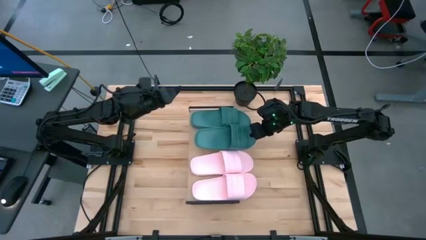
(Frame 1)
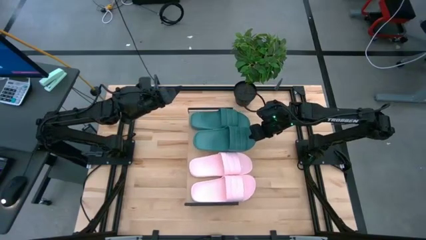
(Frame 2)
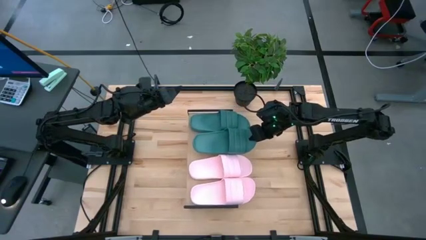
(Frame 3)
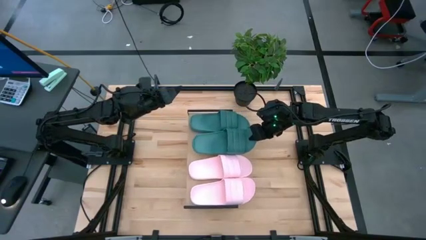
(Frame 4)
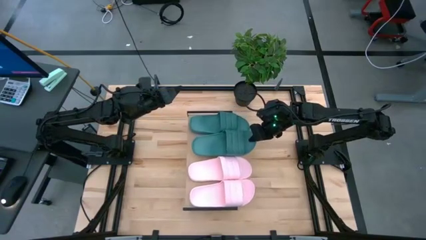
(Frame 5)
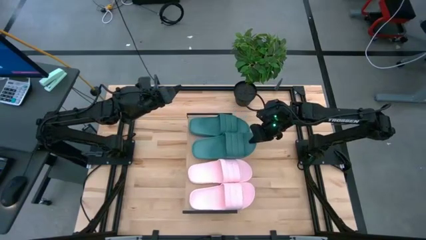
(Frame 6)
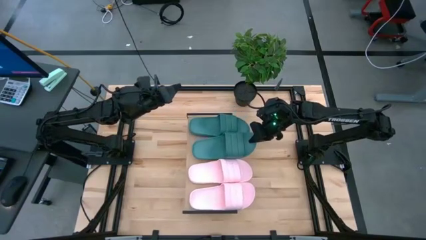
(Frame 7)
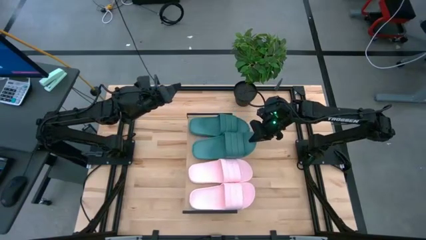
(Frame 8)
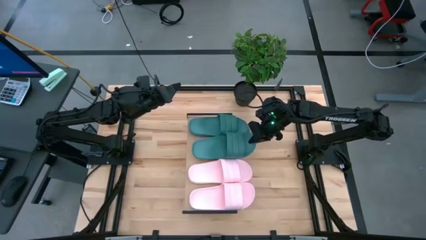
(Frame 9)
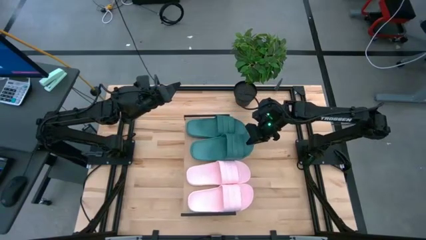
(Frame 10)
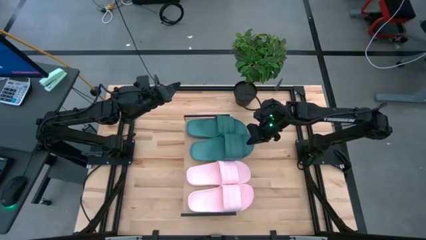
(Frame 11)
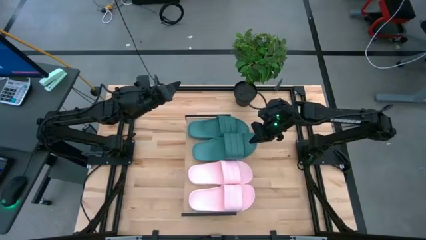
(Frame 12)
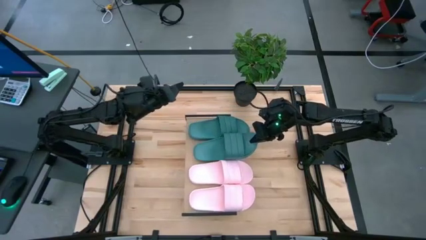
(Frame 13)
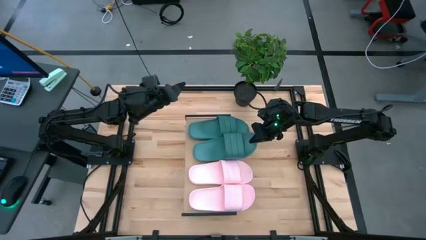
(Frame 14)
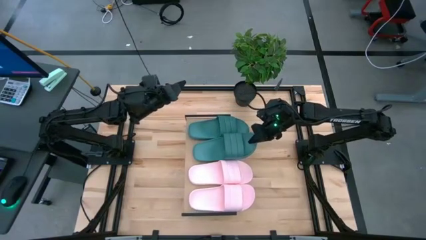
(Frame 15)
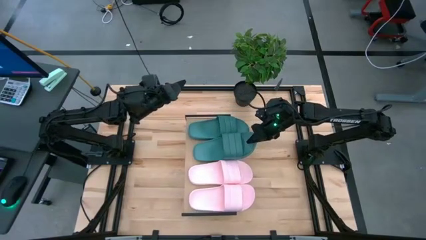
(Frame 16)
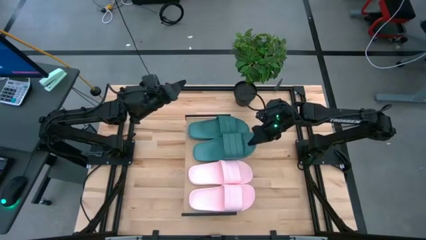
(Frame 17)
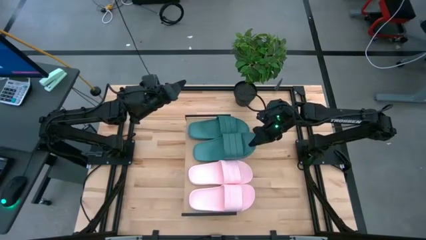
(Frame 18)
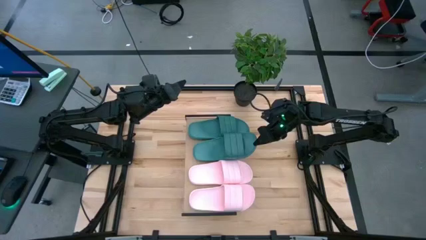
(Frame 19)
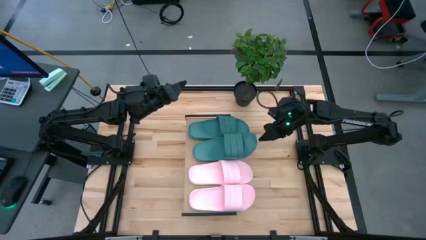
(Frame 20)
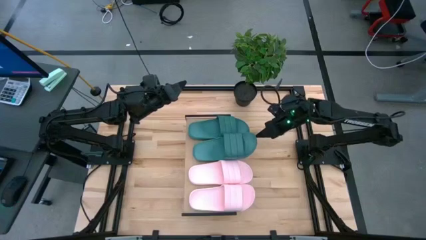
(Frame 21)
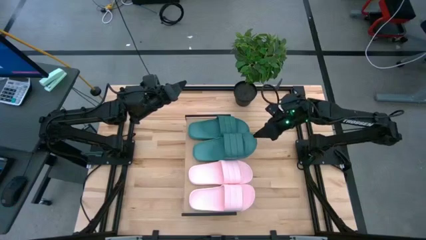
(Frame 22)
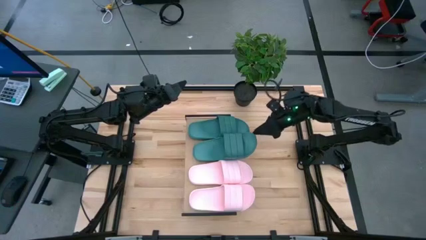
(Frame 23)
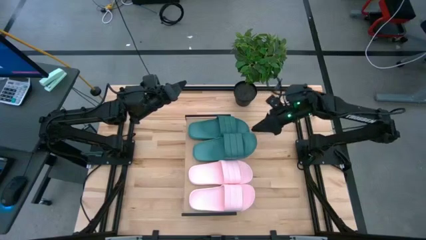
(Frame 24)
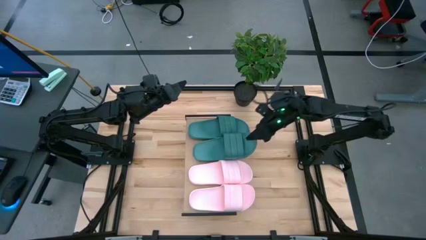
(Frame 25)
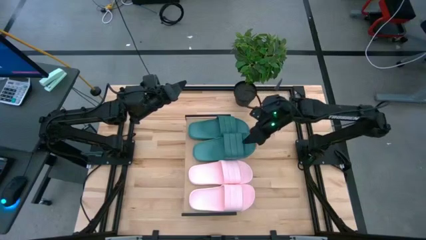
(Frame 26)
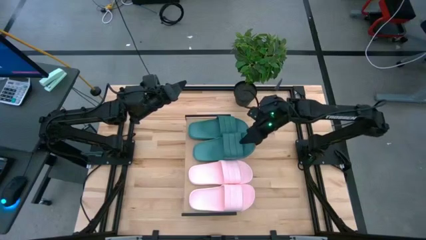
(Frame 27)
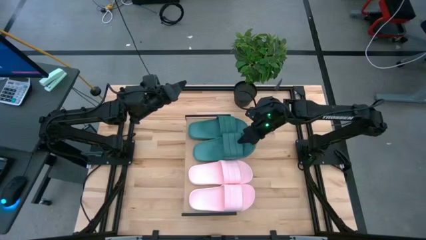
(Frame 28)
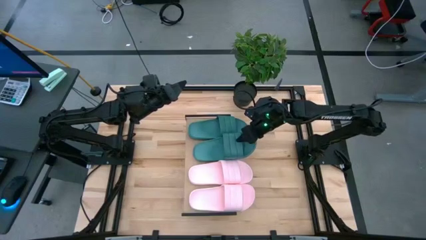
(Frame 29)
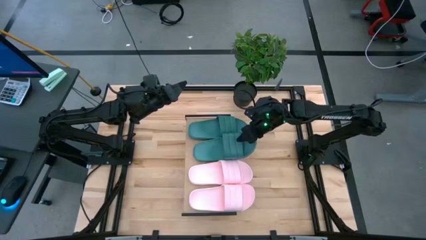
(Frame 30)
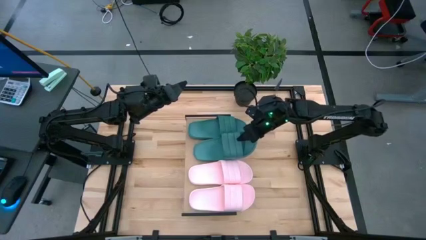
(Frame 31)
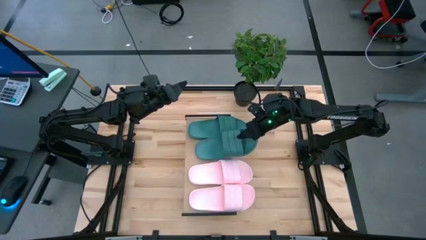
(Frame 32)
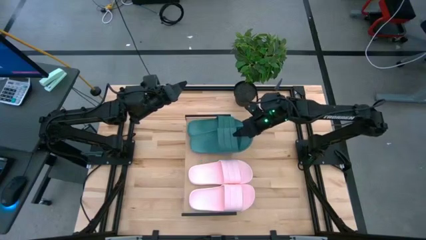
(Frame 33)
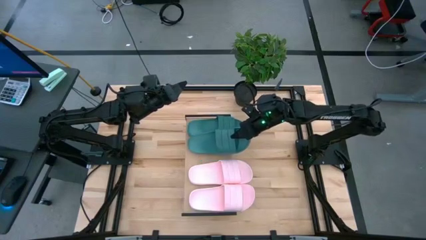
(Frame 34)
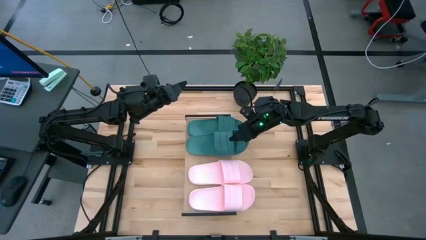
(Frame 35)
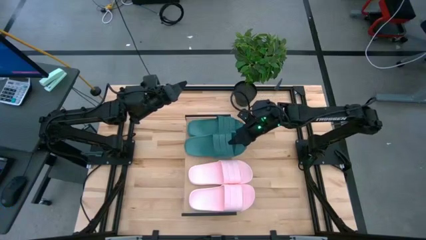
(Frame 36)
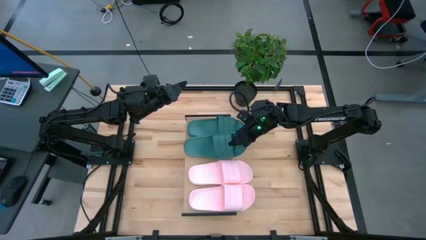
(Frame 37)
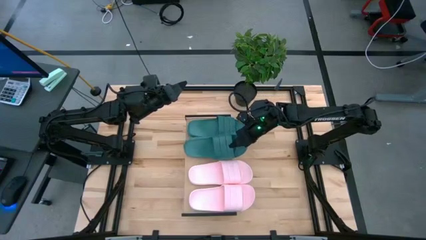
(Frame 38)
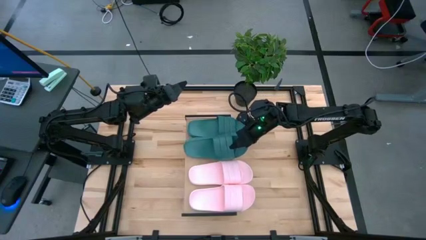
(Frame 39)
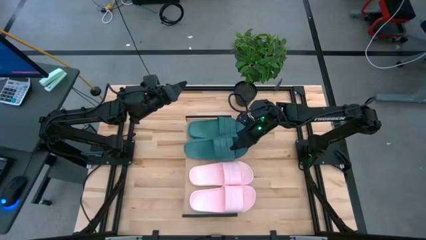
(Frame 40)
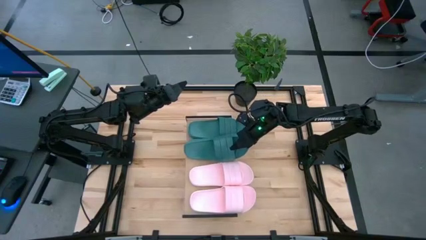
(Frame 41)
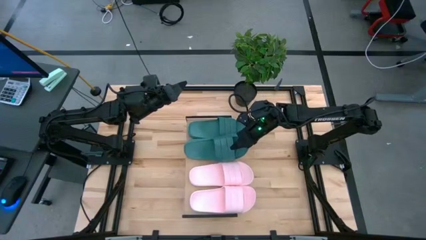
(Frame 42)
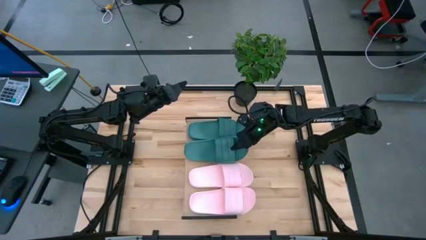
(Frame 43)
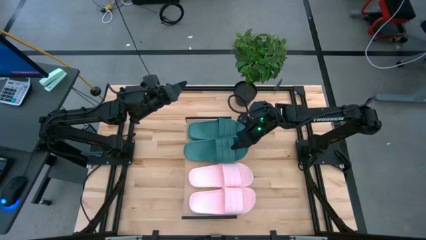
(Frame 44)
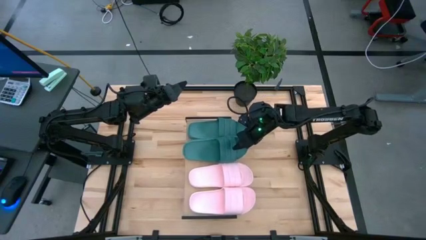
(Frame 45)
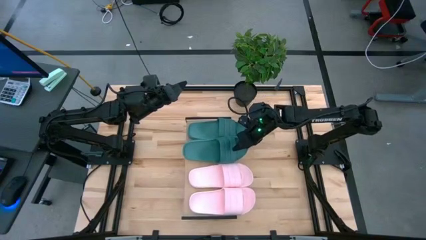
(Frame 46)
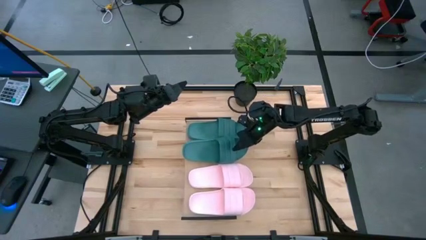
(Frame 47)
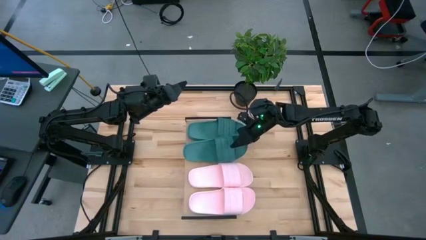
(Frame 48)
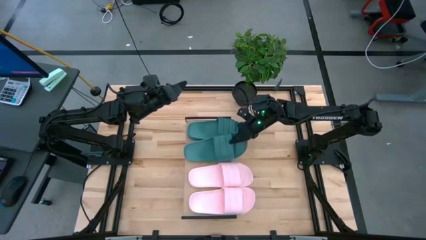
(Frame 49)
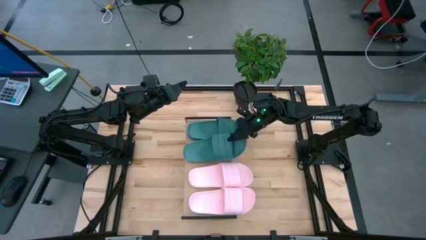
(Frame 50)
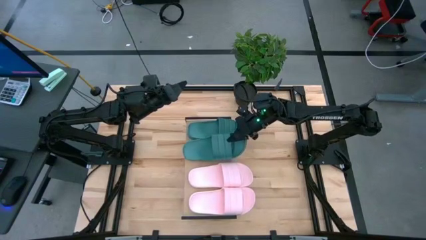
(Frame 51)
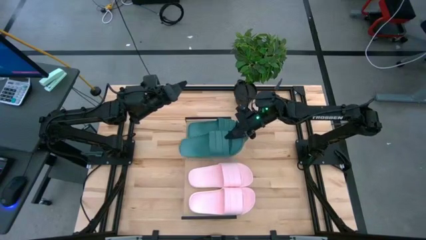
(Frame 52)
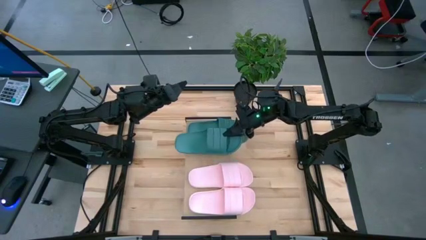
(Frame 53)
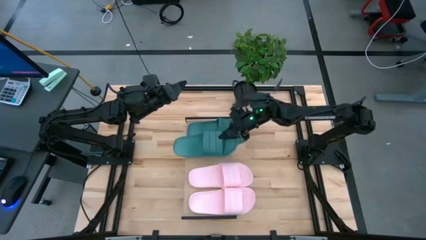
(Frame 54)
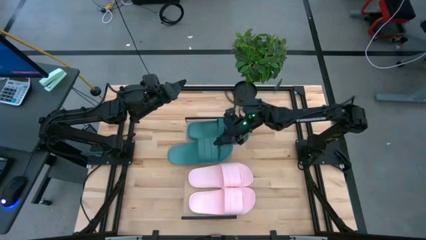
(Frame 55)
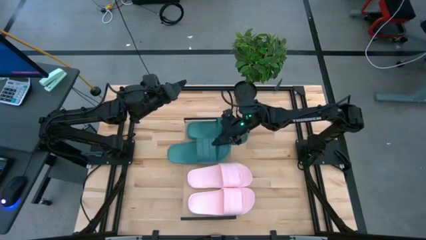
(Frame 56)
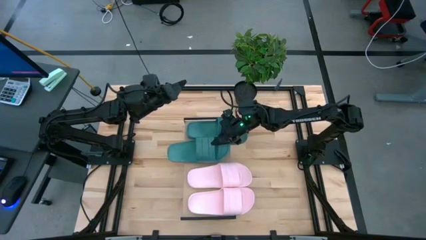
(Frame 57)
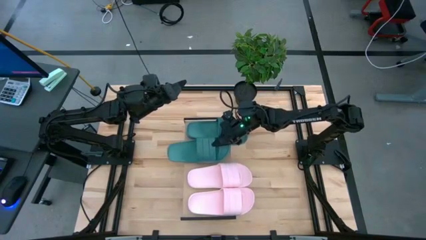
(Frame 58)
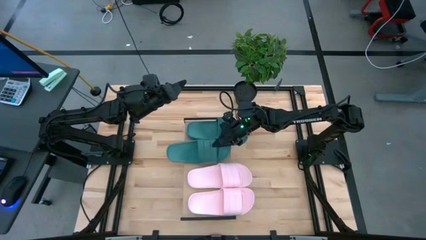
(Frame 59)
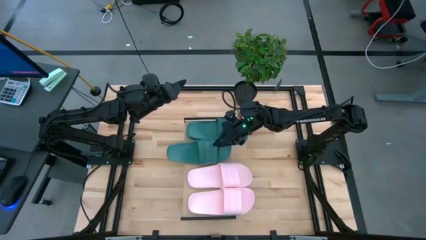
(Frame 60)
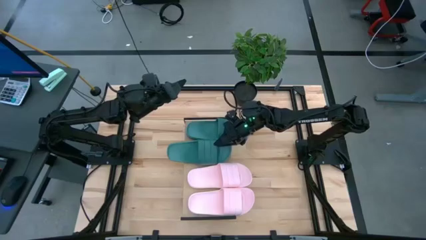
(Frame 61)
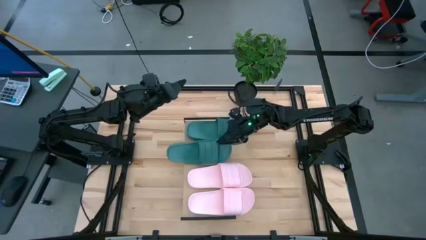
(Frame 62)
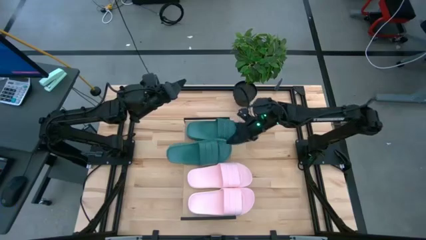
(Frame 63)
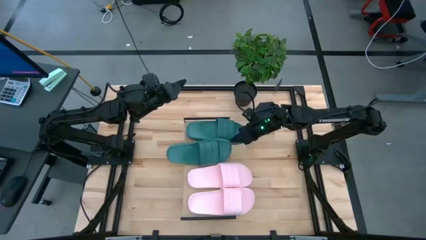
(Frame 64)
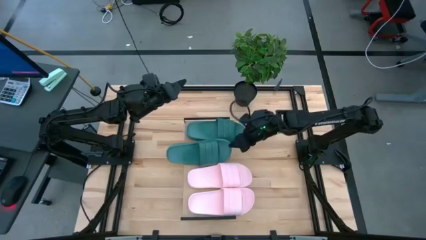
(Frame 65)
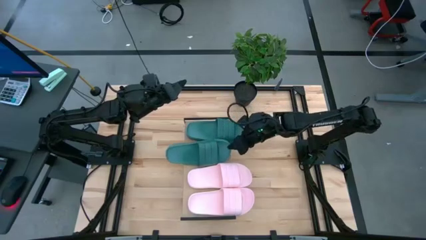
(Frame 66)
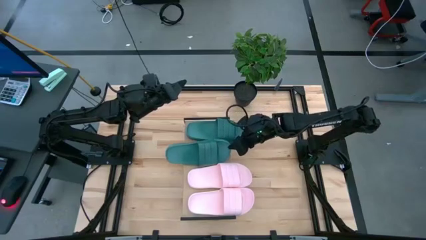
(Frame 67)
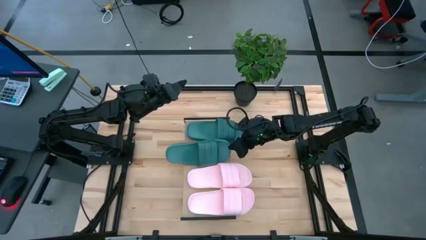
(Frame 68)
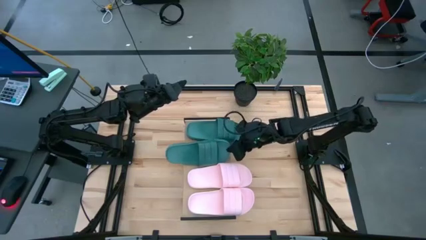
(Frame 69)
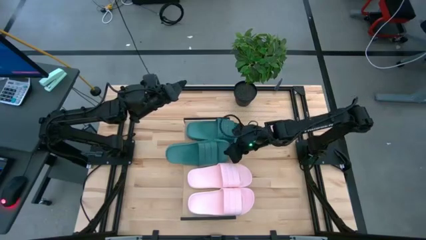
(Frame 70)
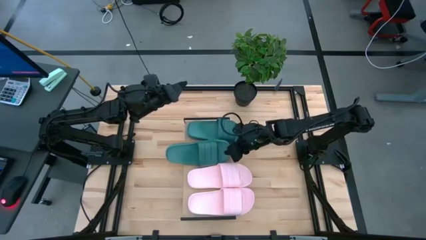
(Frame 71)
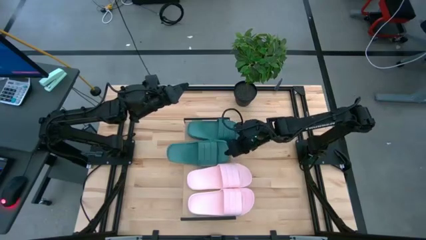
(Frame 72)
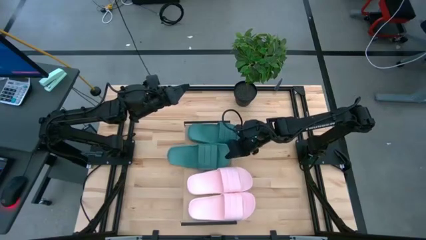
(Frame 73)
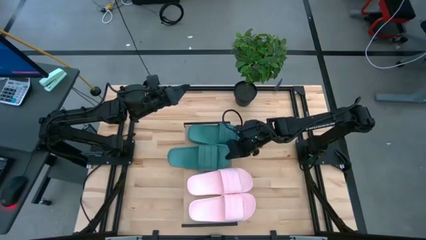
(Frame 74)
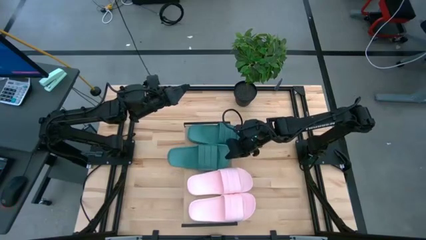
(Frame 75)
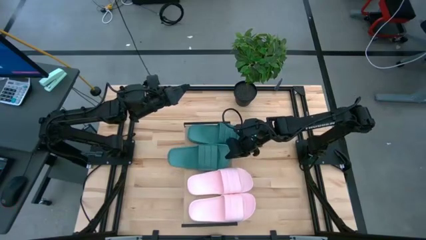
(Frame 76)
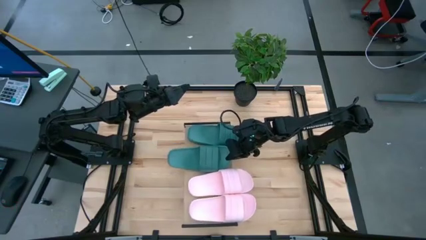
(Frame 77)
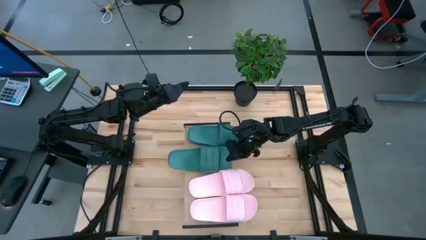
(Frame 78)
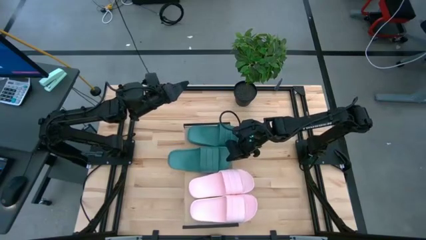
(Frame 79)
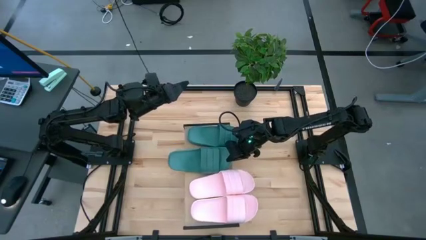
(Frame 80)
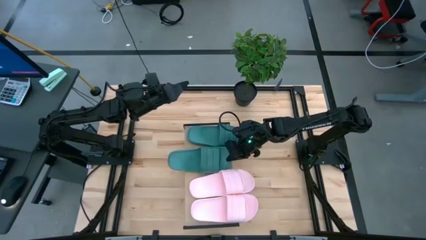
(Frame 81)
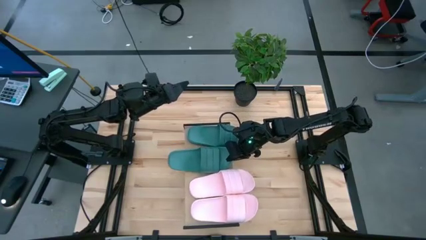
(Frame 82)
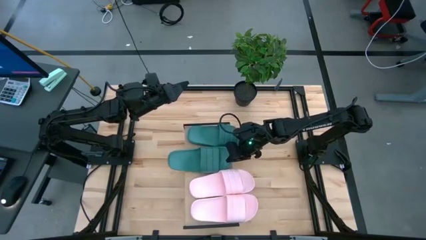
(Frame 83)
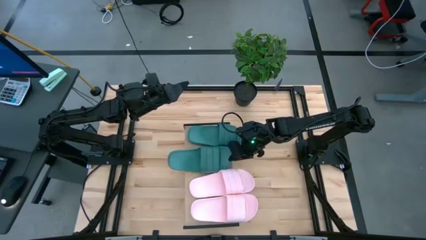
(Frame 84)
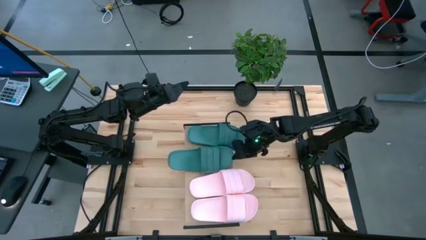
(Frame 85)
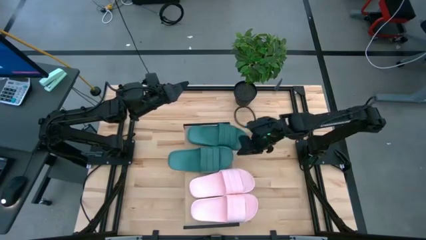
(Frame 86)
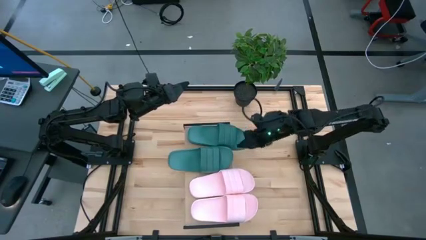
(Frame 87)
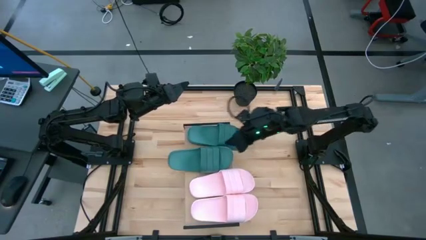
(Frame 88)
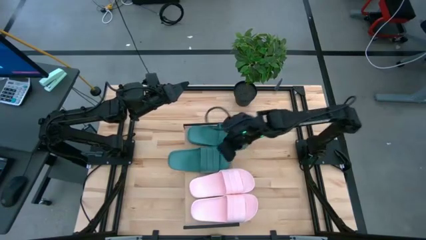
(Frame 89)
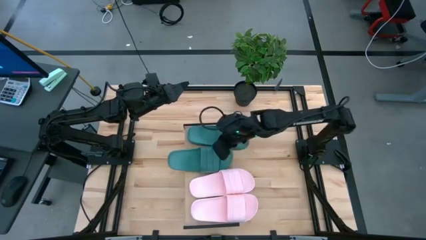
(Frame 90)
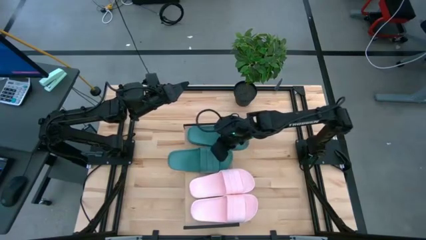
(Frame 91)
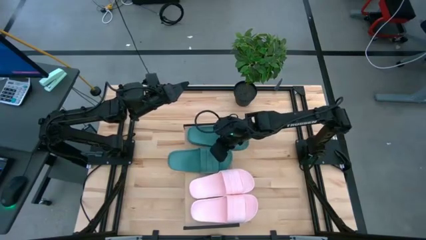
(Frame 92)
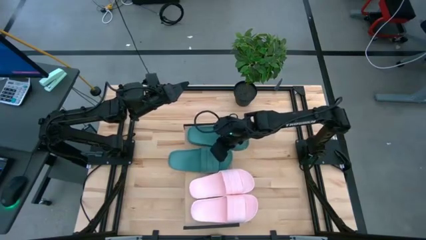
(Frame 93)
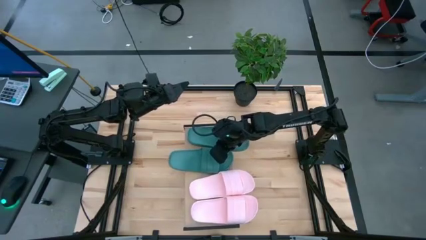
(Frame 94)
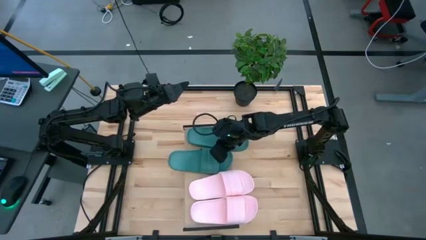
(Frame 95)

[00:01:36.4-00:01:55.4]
Task: Pick and place slides into the shelf
Put the green slide on the shelf
